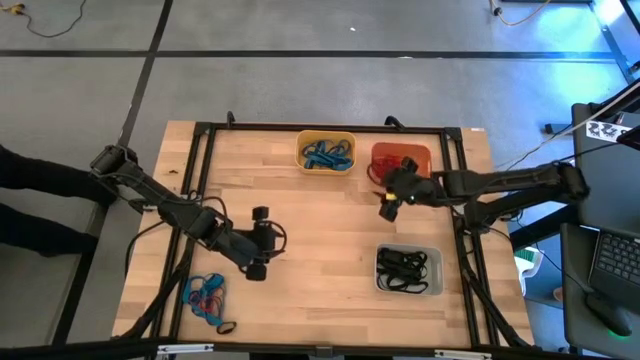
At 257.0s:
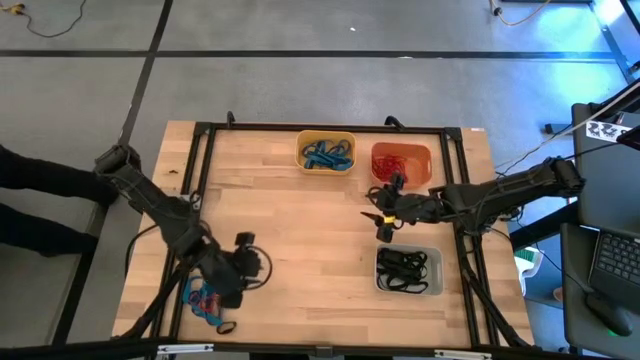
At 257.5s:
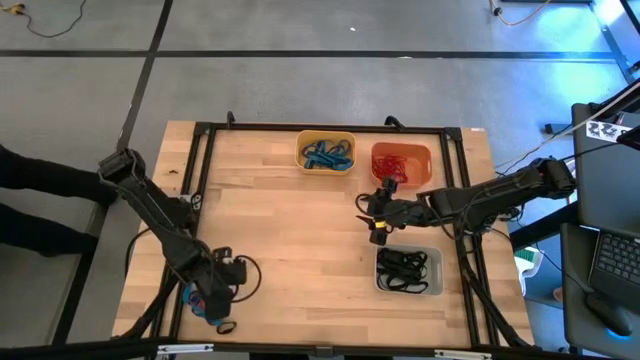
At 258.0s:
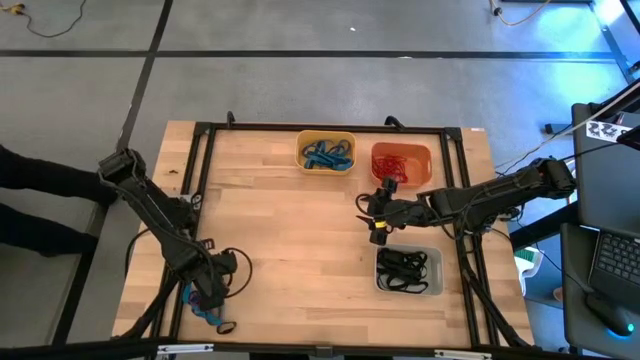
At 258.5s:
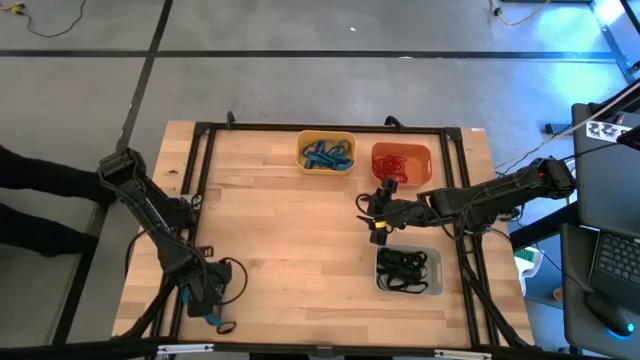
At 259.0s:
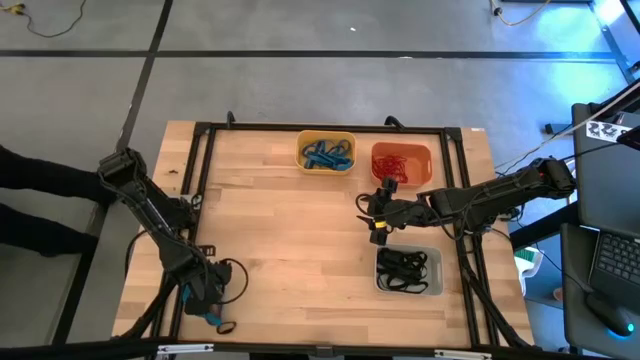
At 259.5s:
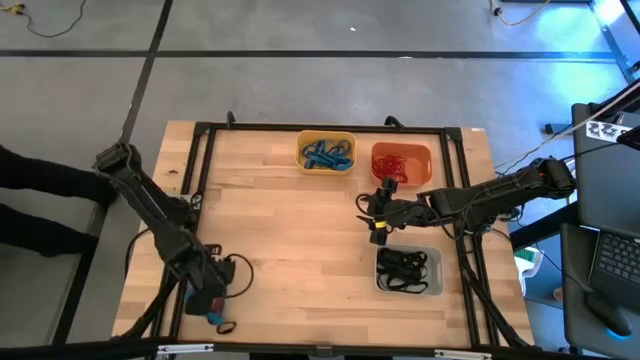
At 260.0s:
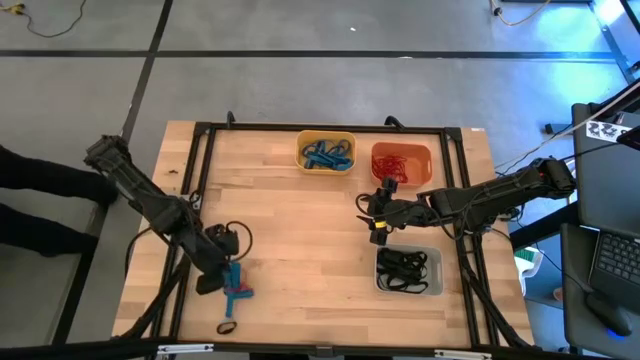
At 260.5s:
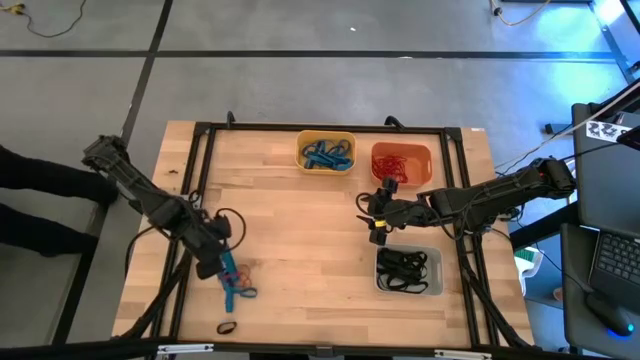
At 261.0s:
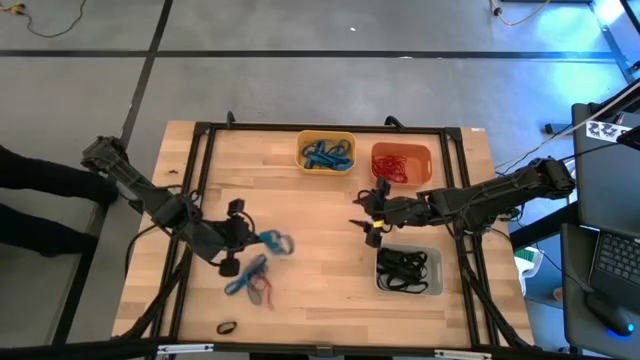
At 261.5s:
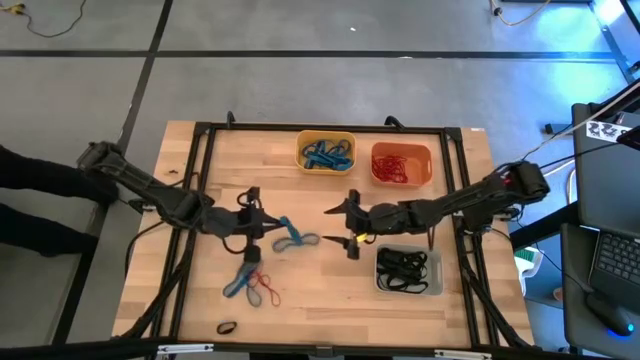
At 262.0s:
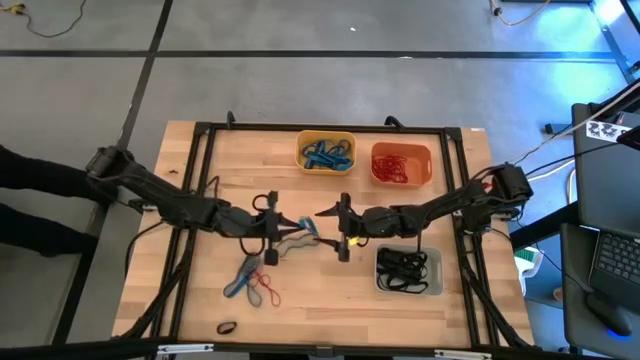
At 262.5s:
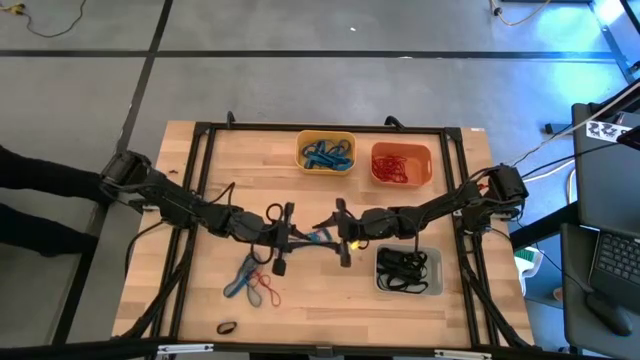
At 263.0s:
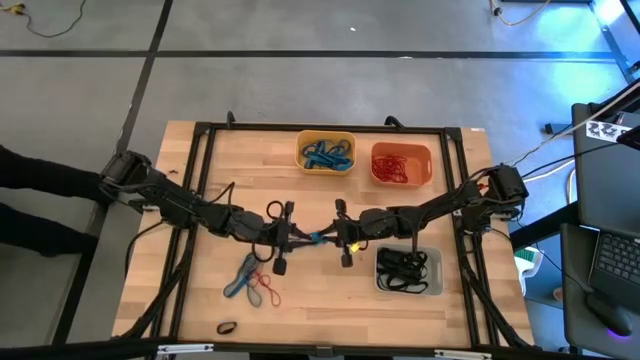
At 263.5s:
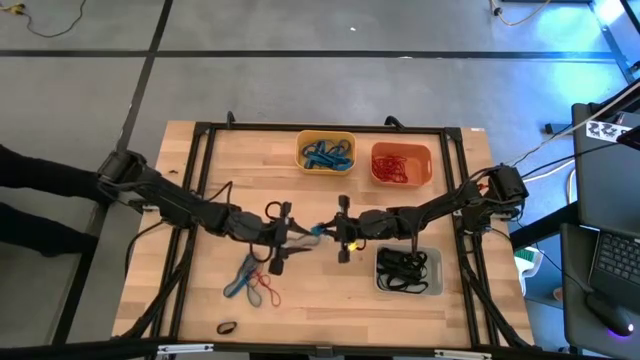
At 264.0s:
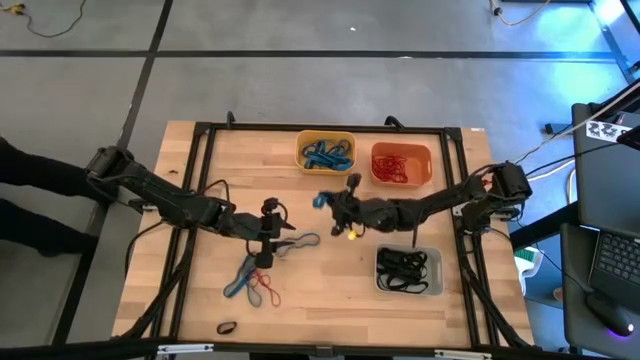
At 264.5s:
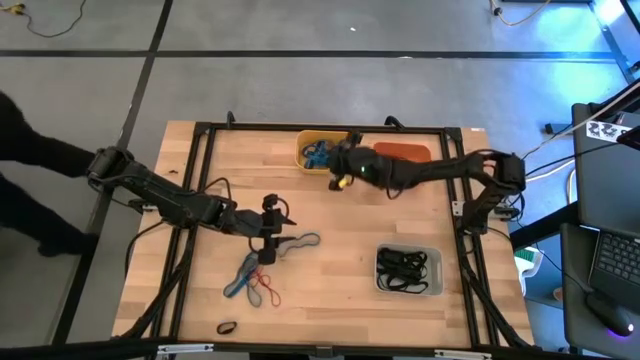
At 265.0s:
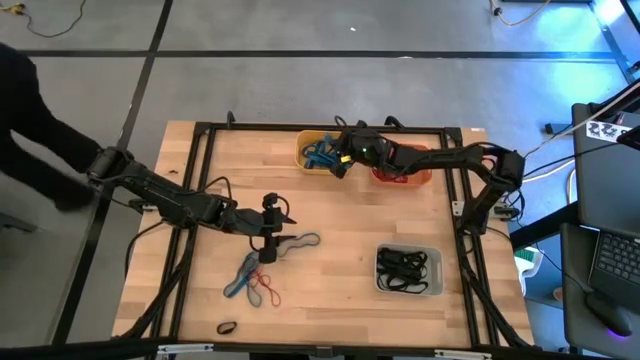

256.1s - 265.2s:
Task: Sort rubber bands into baskets
Put the blue rubber band into the yellow bin

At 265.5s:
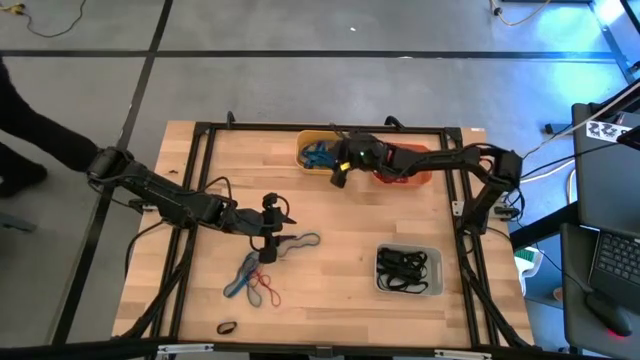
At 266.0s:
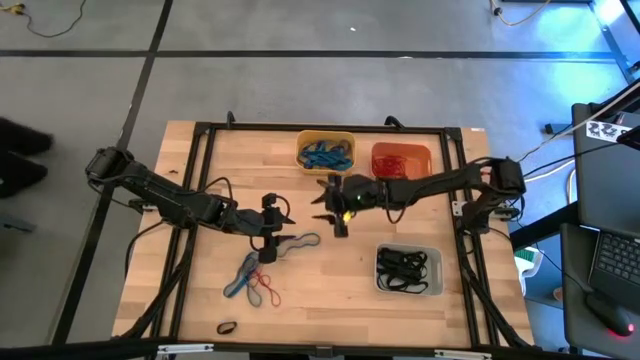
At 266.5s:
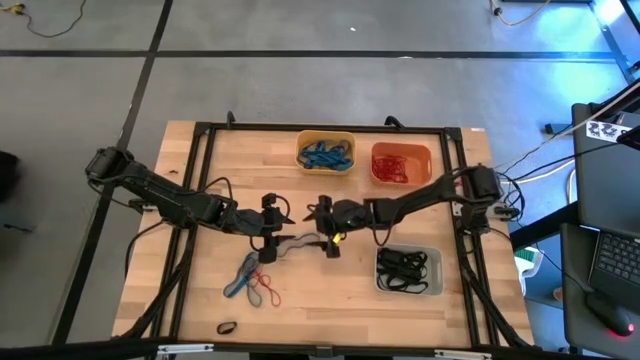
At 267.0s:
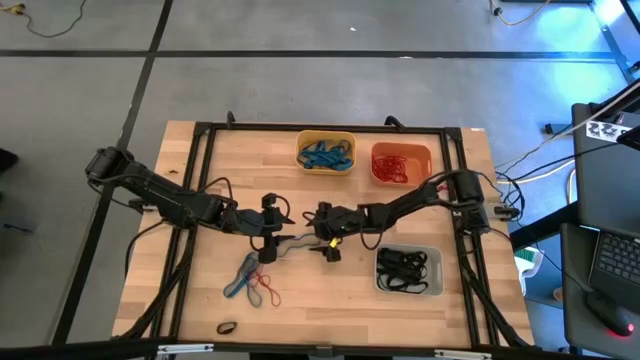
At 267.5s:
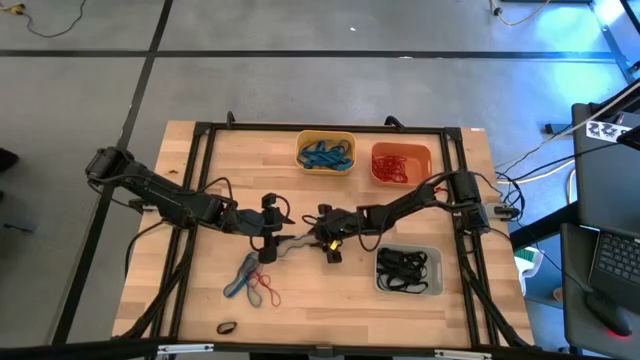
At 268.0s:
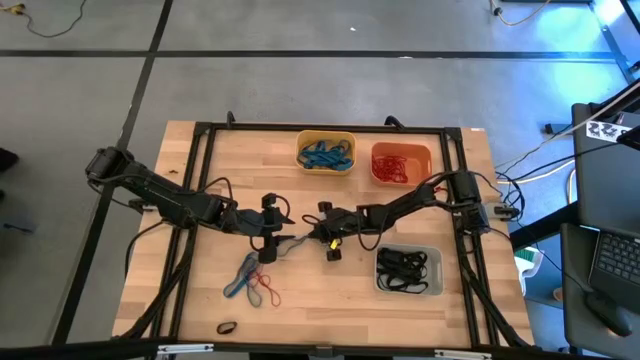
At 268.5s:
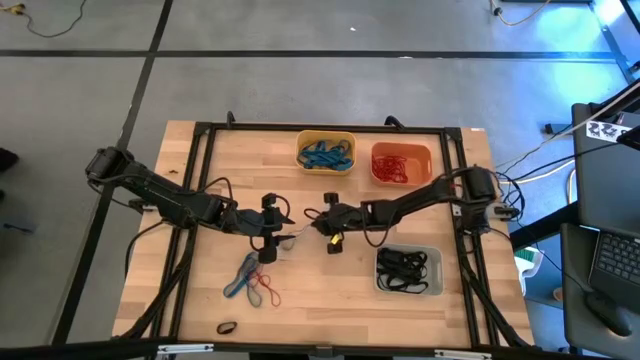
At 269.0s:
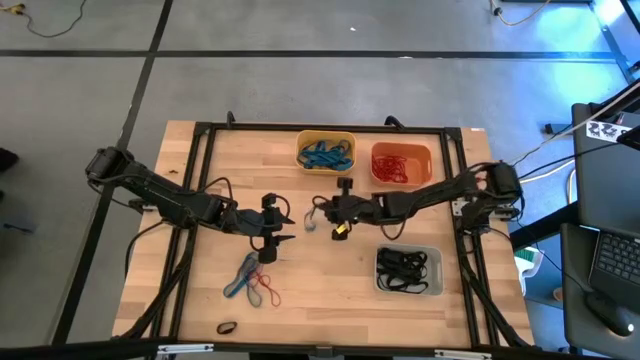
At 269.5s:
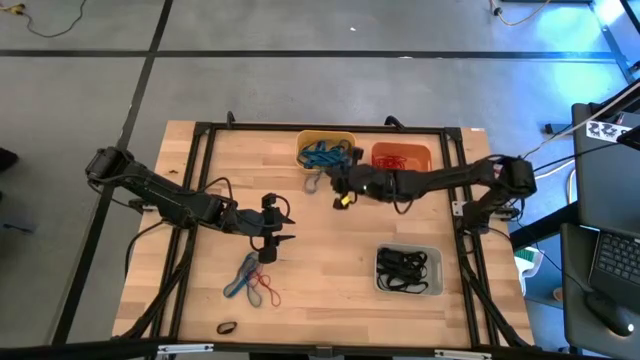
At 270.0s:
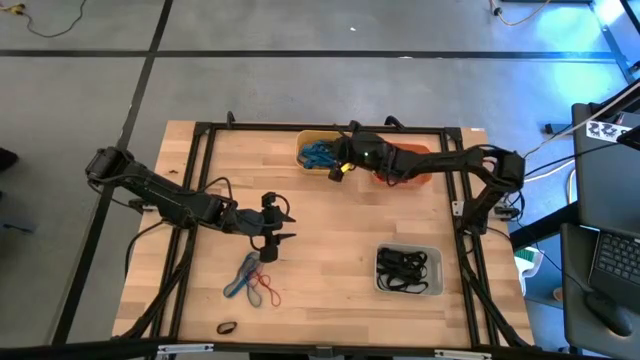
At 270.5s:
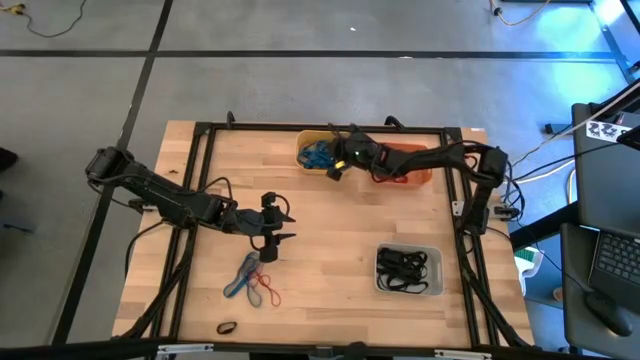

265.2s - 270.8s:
Put the blue rubber band into the yellow bin

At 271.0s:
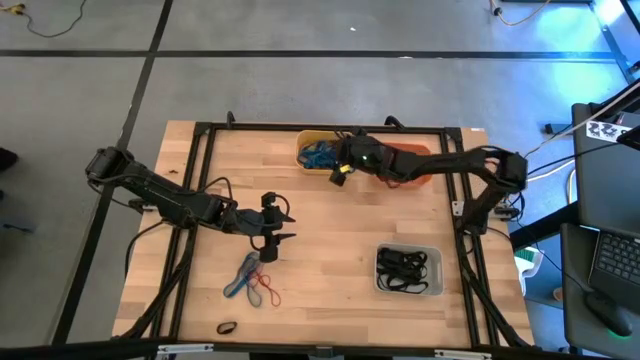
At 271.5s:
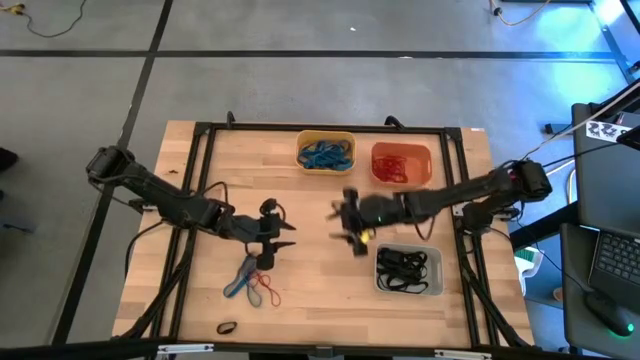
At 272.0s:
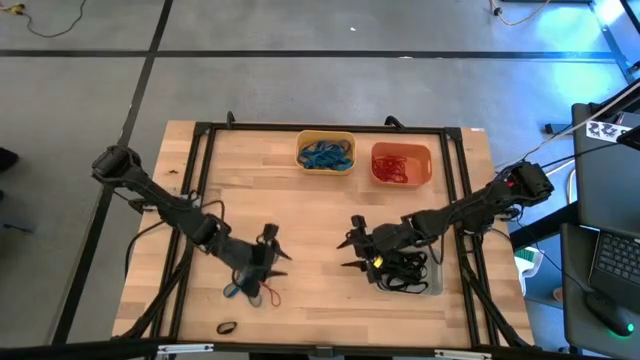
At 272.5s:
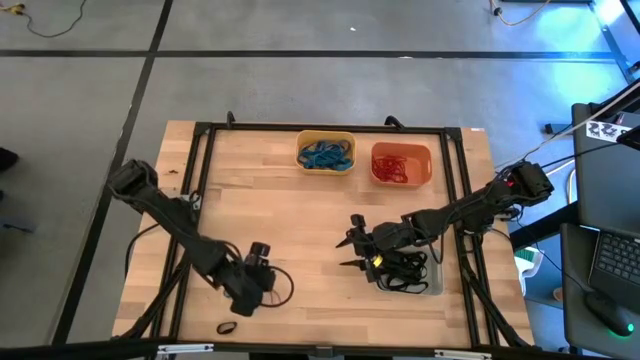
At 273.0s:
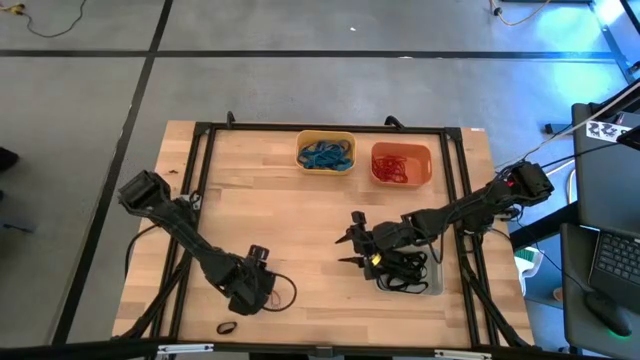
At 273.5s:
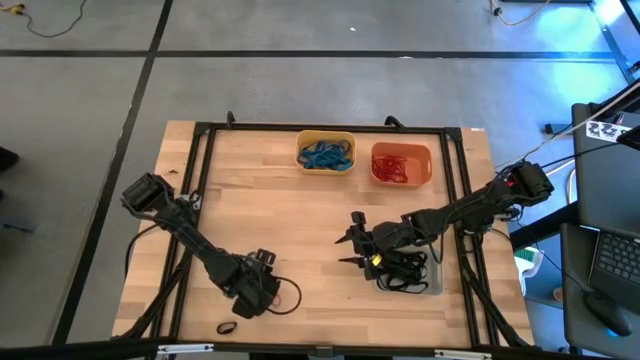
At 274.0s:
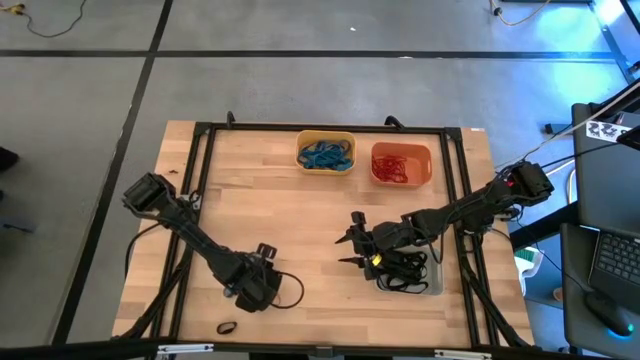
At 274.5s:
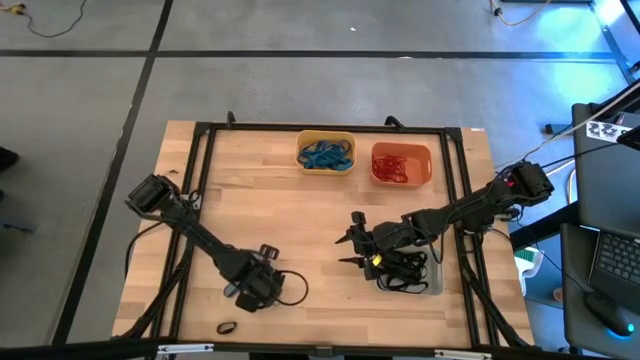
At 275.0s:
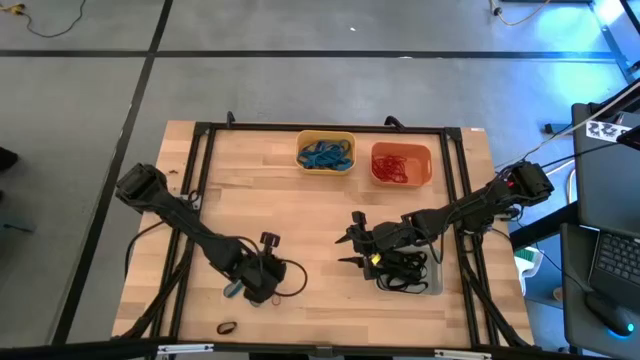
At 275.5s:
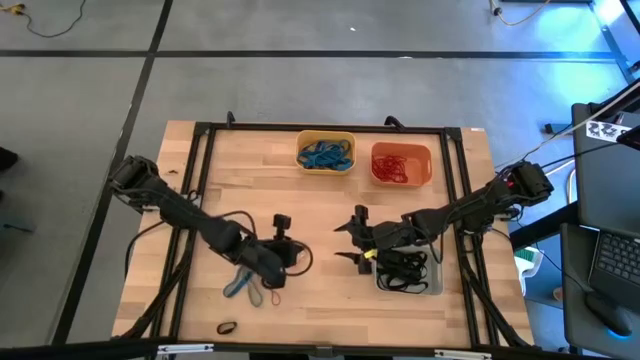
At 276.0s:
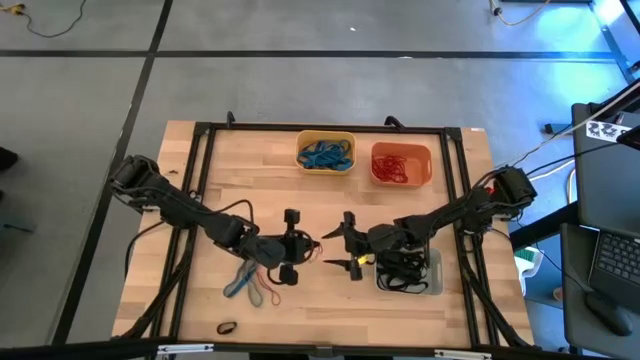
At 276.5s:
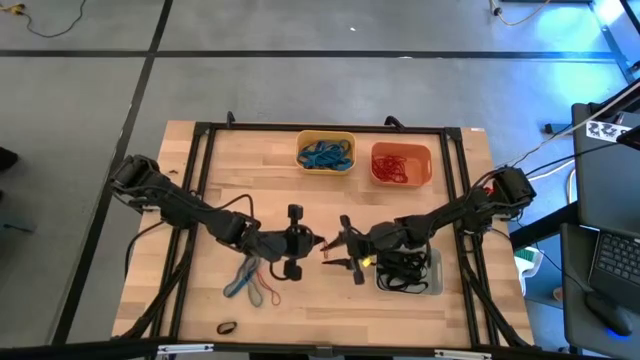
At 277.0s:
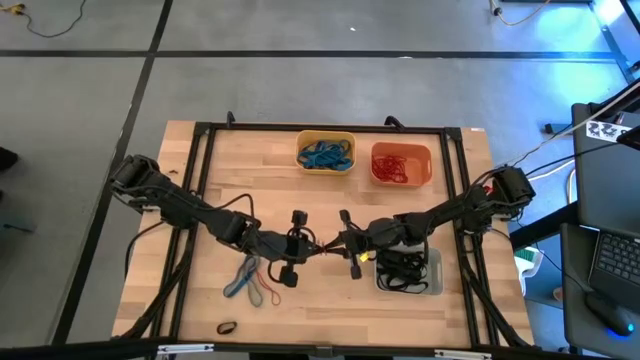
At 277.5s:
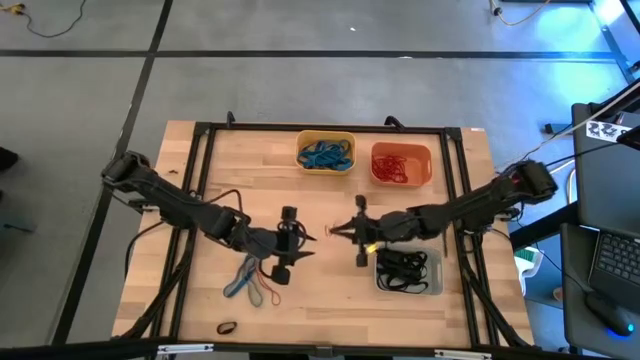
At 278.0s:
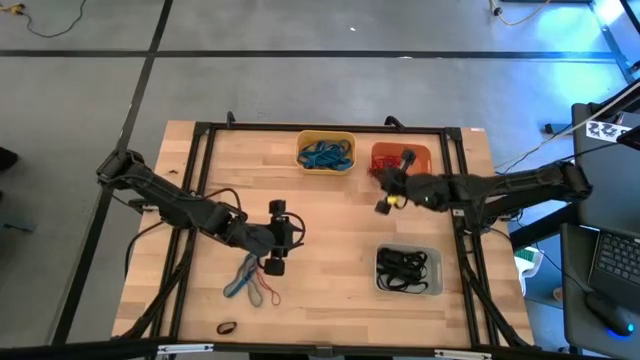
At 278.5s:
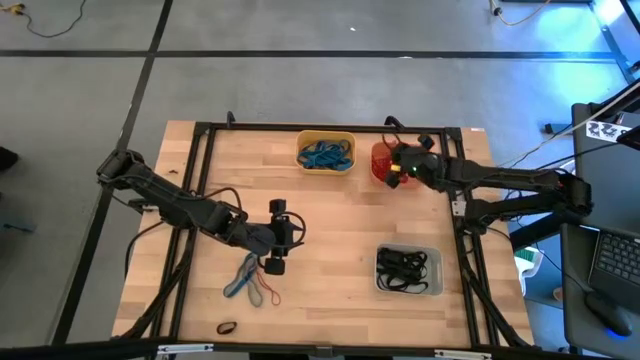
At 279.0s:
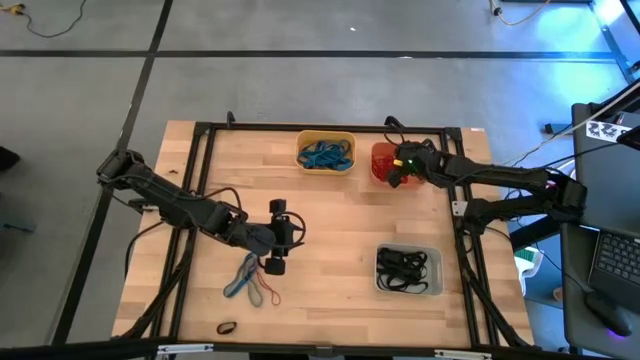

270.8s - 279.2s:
Put the red rubber band into the orange bin
